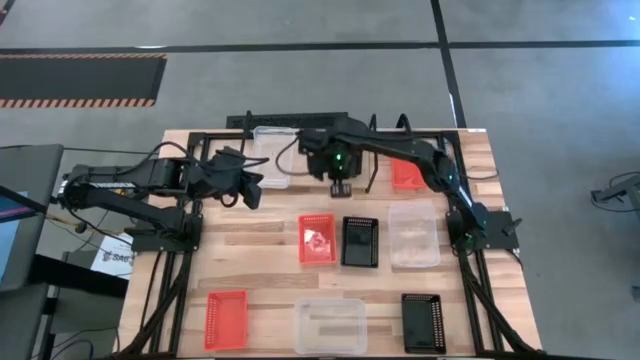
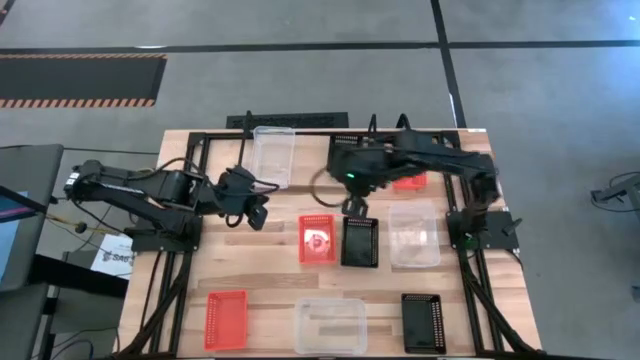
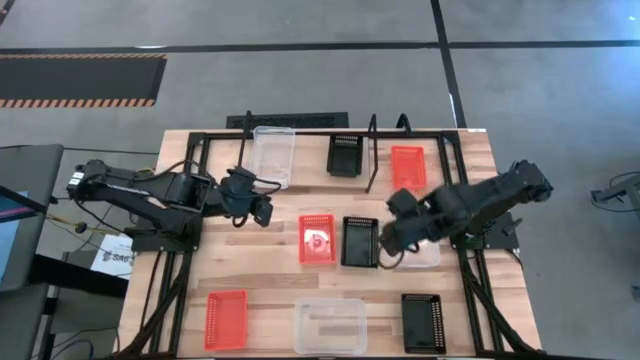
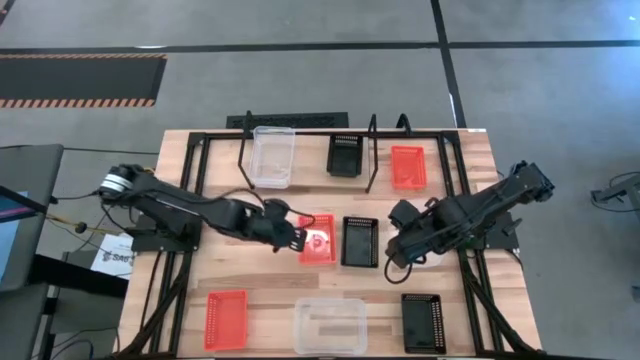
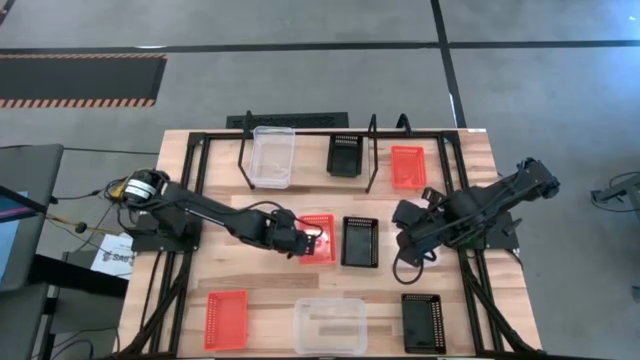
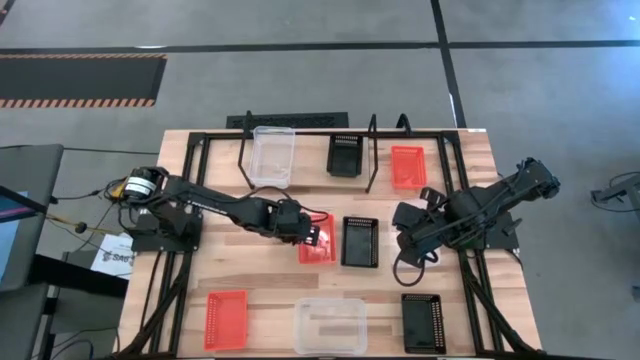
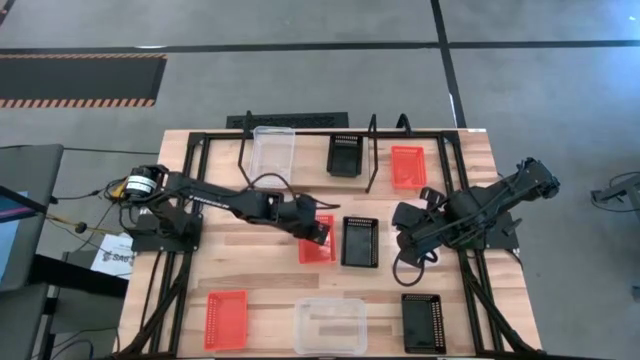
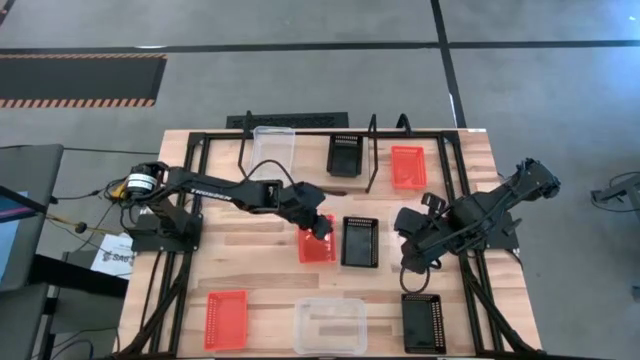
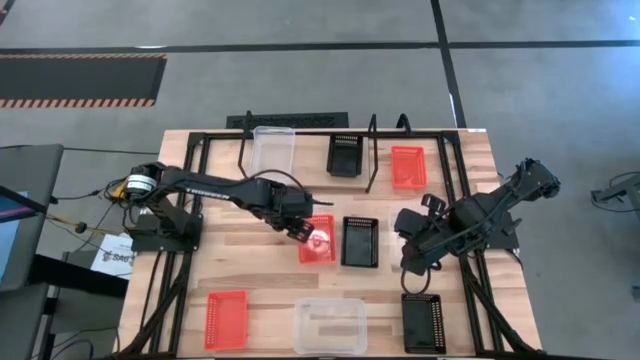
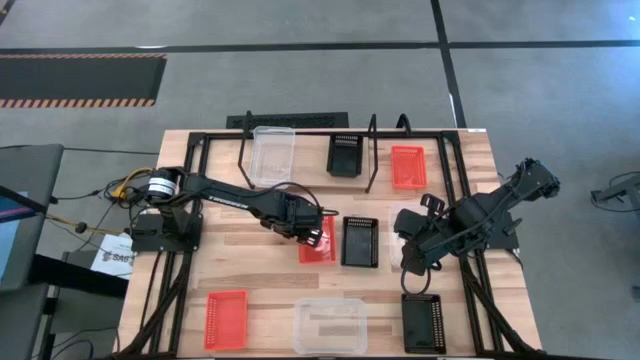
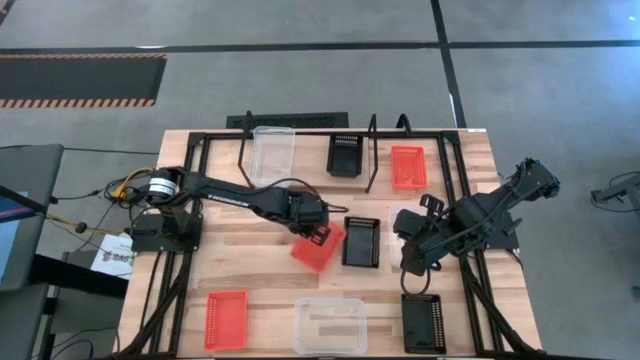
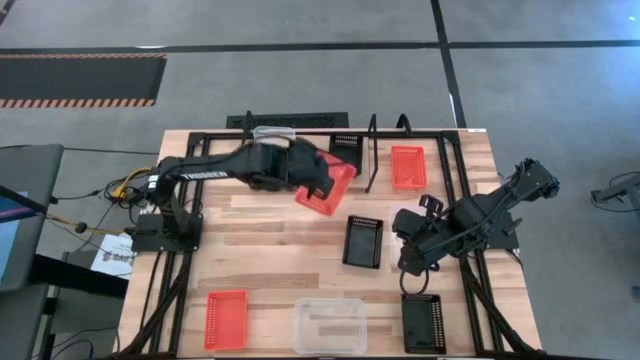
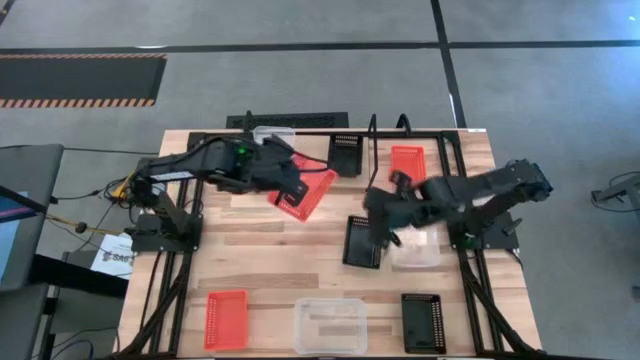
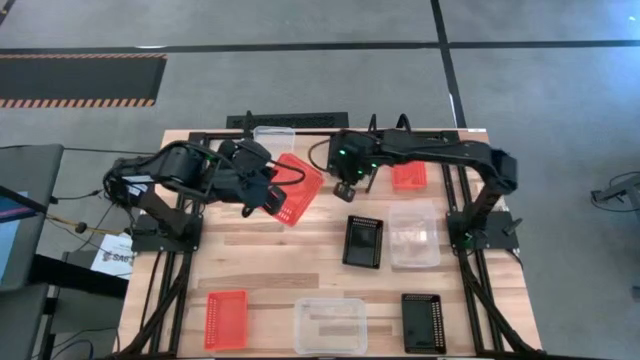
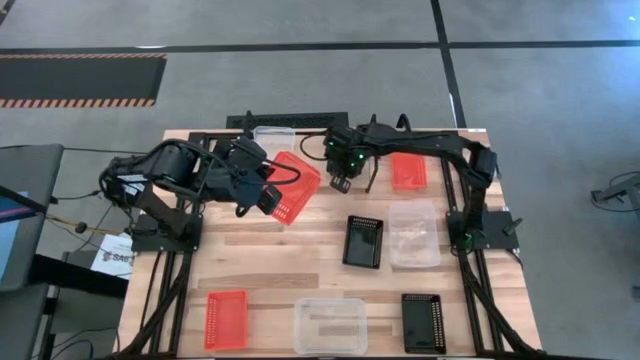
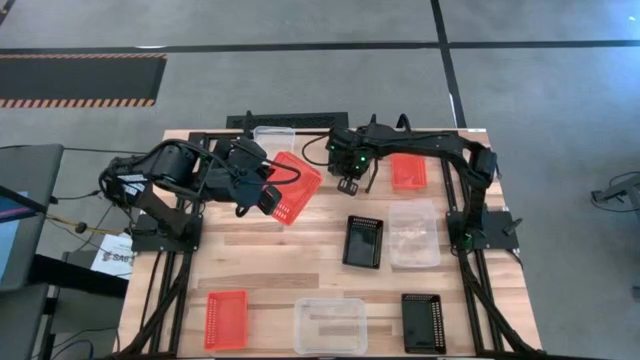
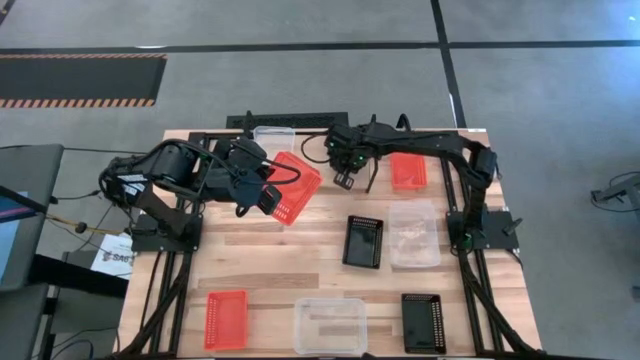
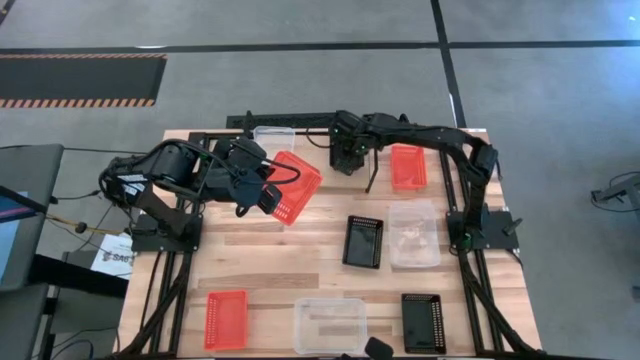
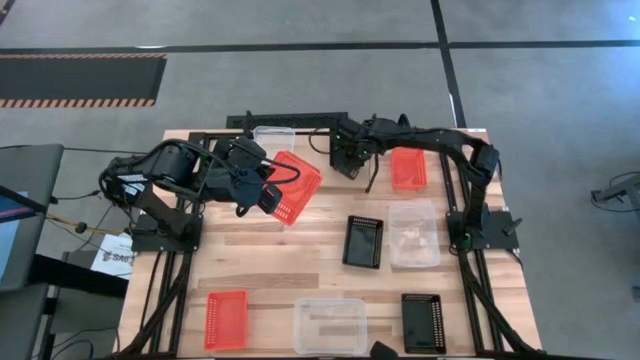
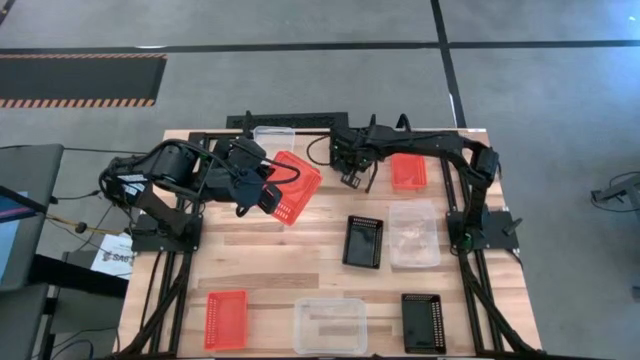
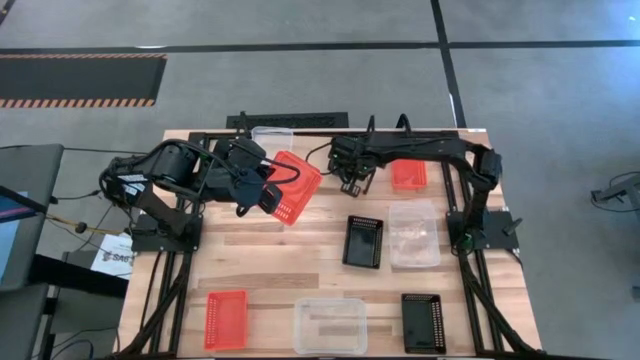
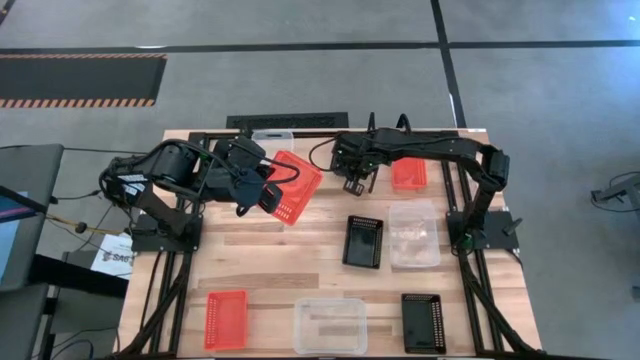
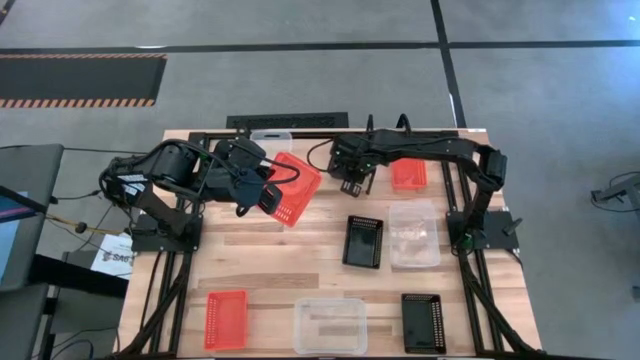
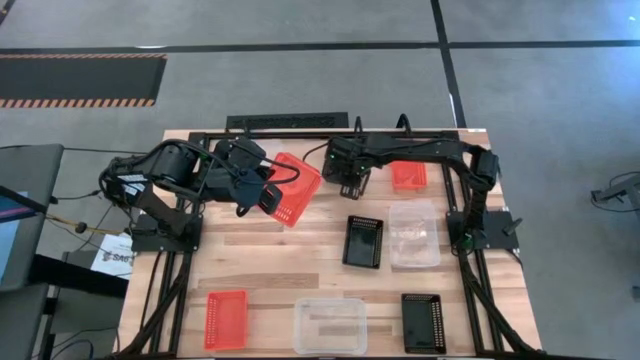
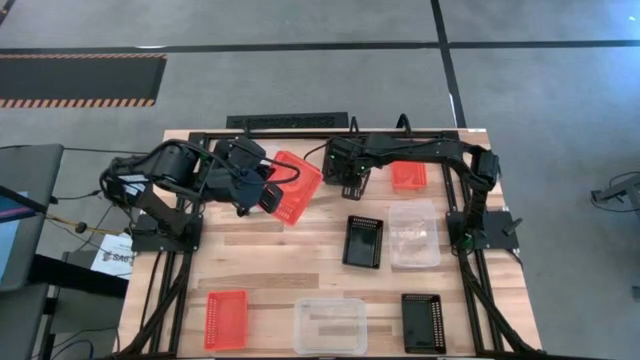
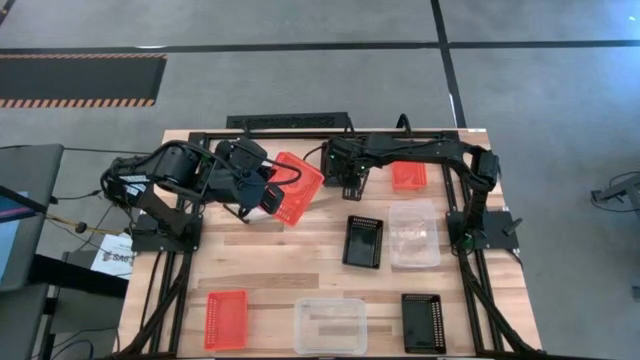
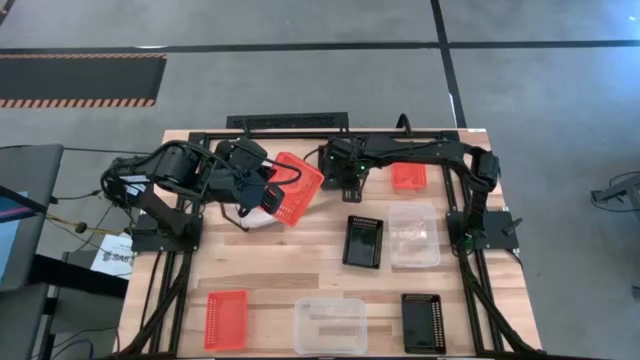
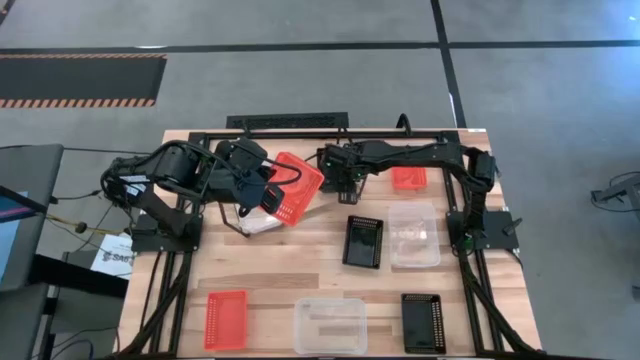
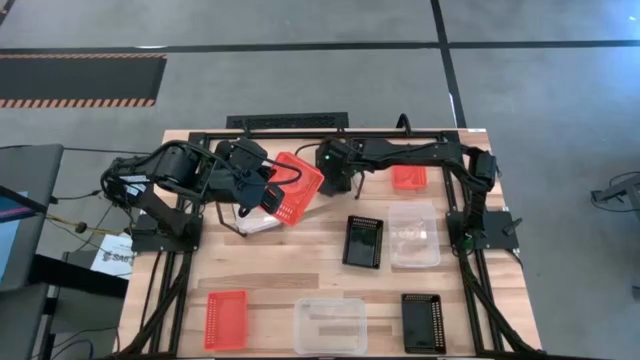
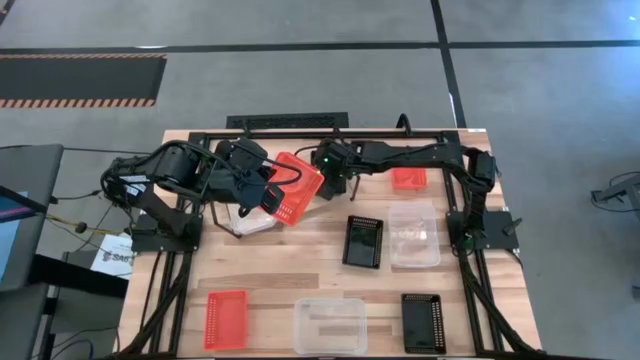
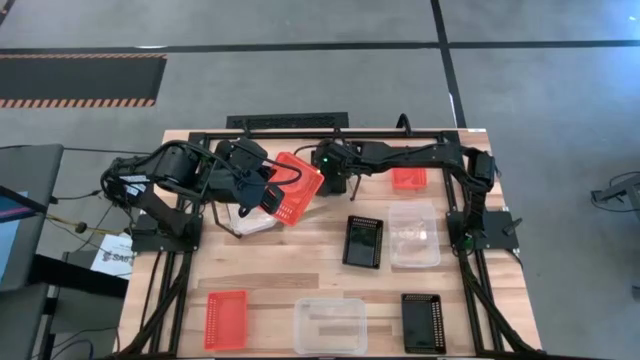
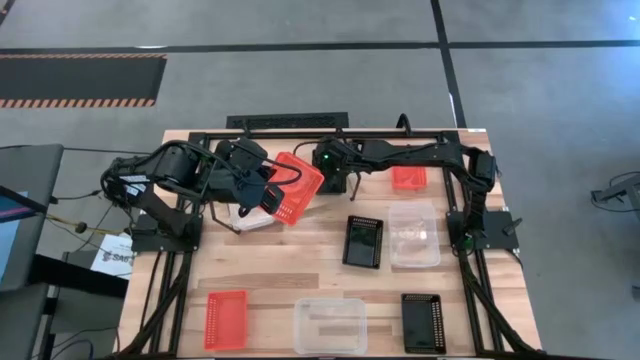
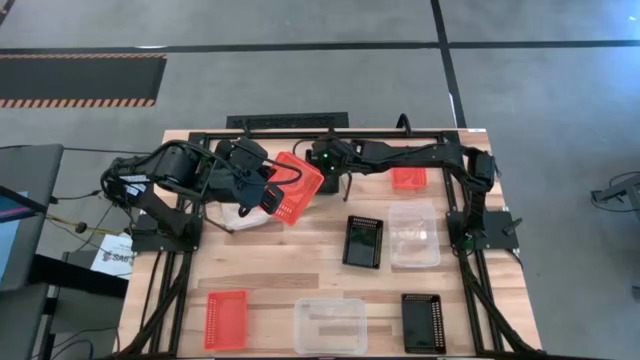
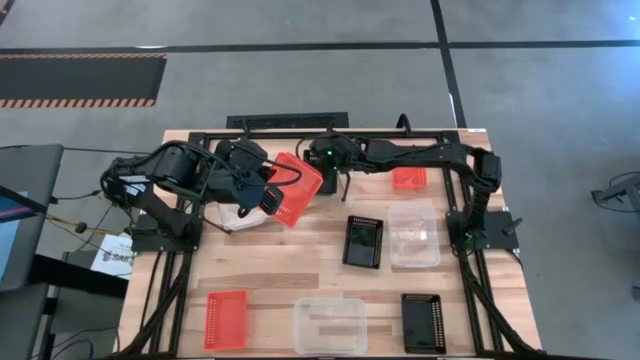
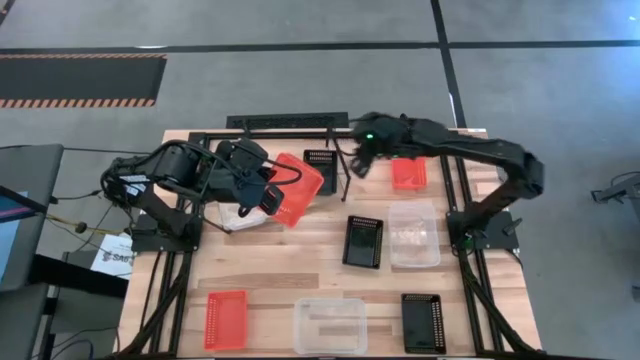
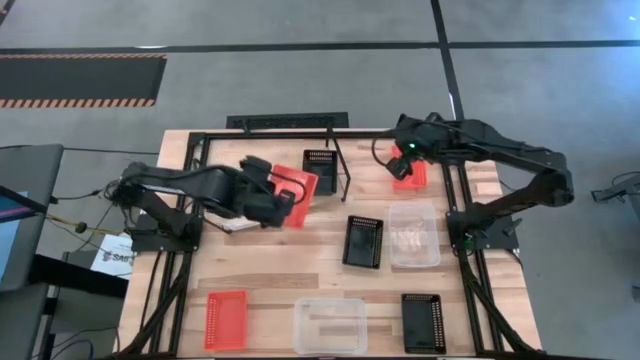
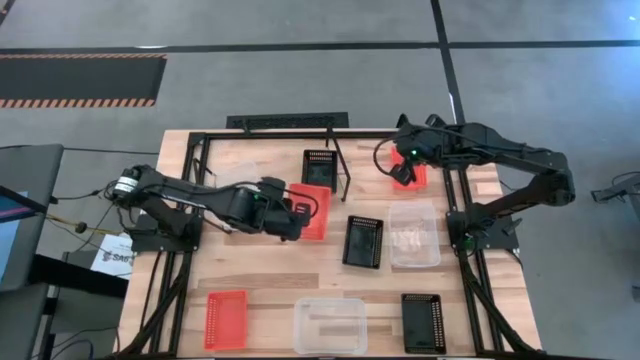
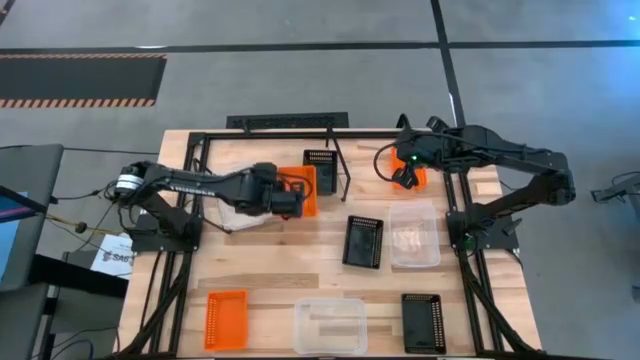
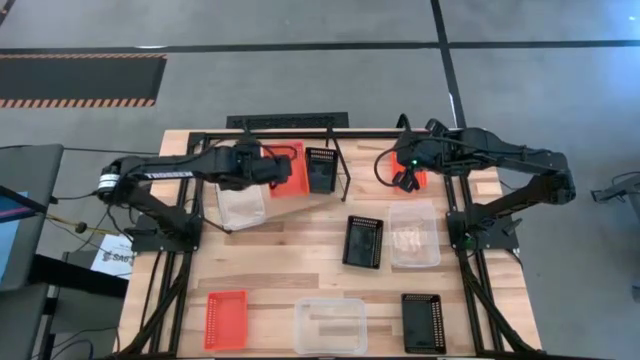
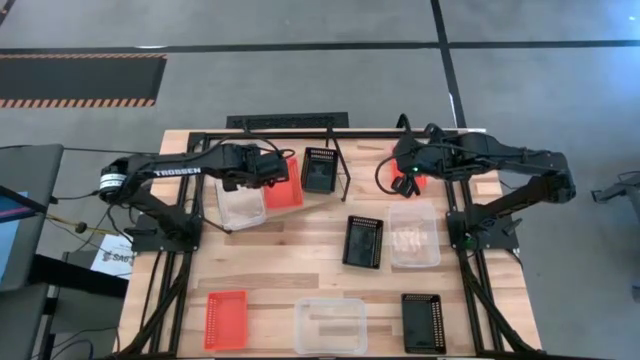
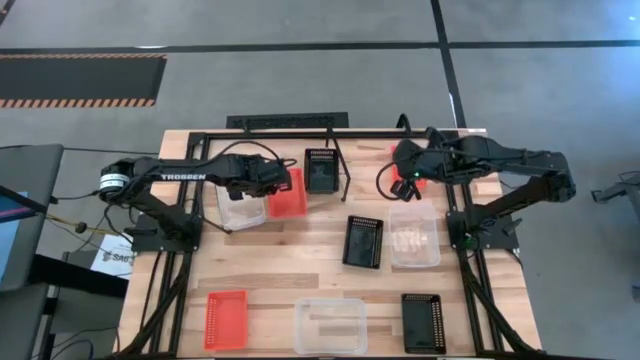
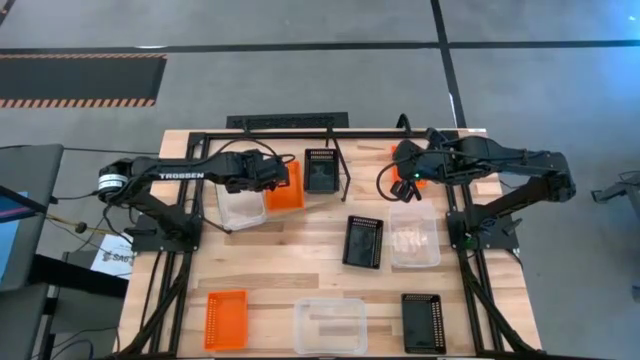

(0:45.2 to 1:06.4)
Task: Stack baskets on shelf by color
Put the center orange bin on the shelf
